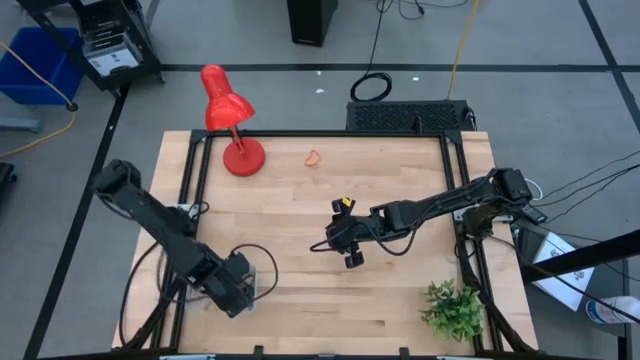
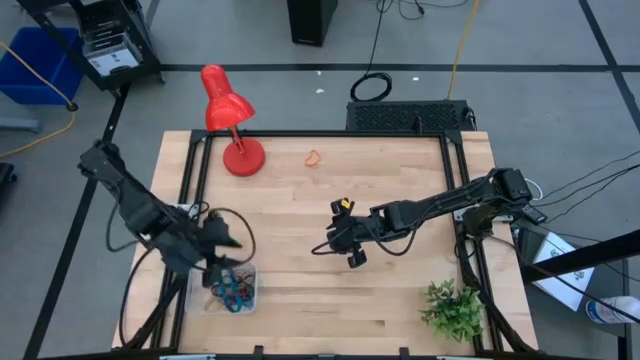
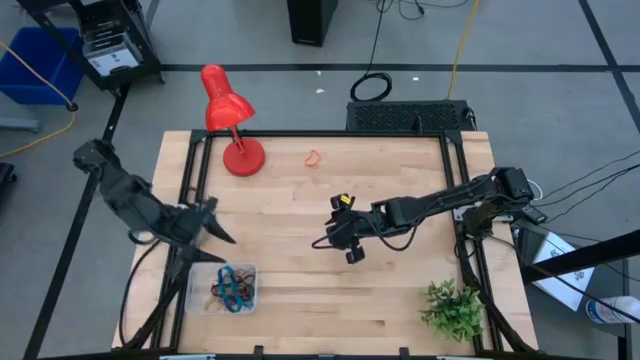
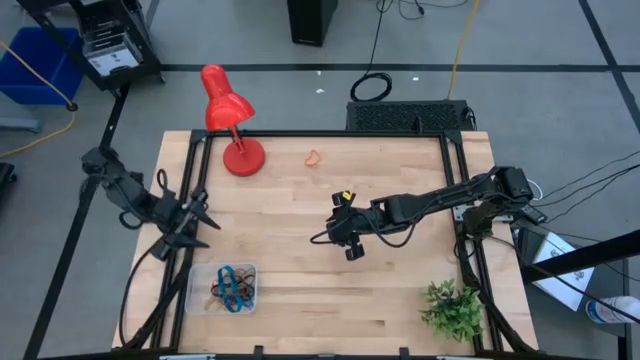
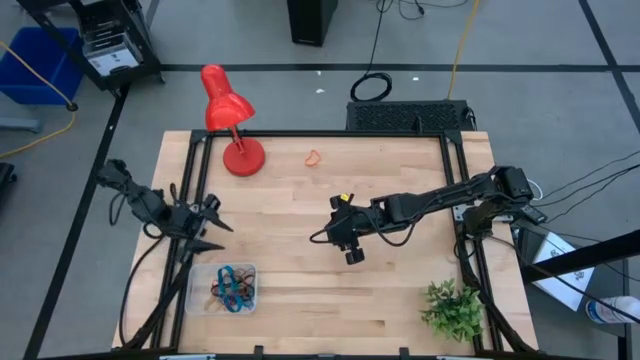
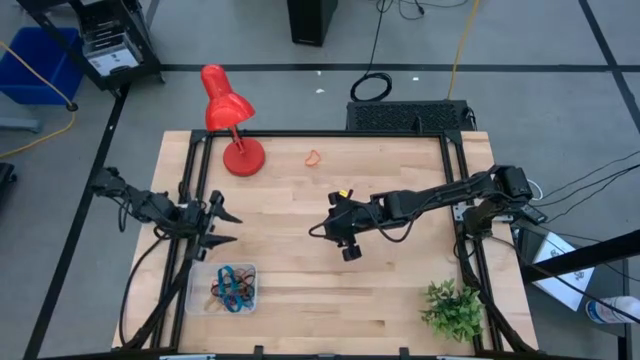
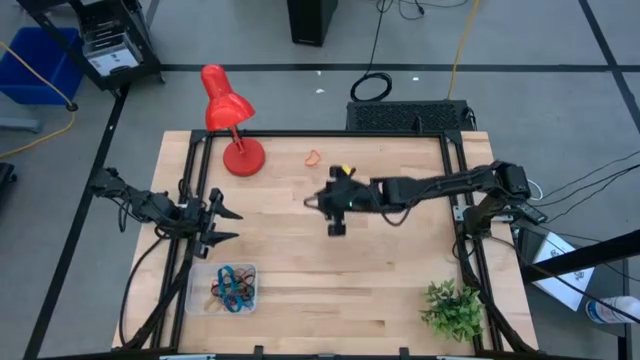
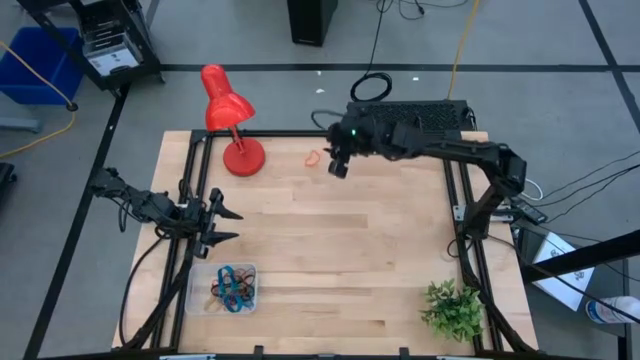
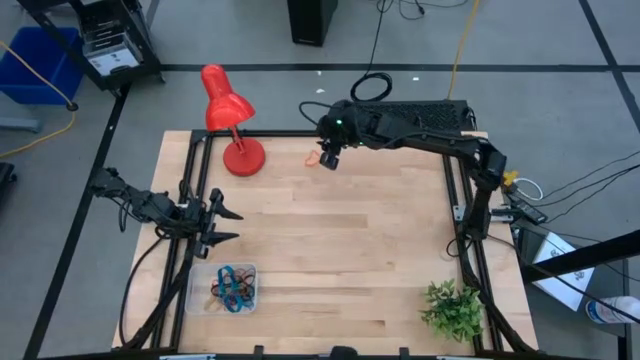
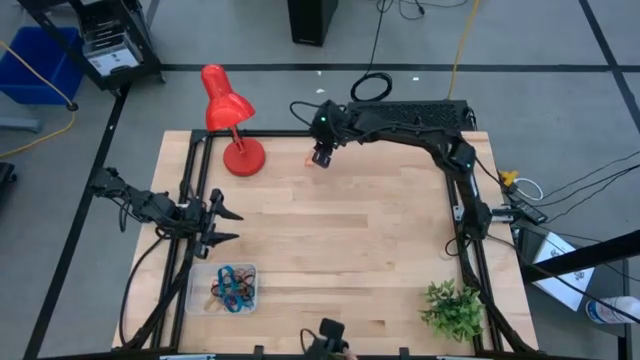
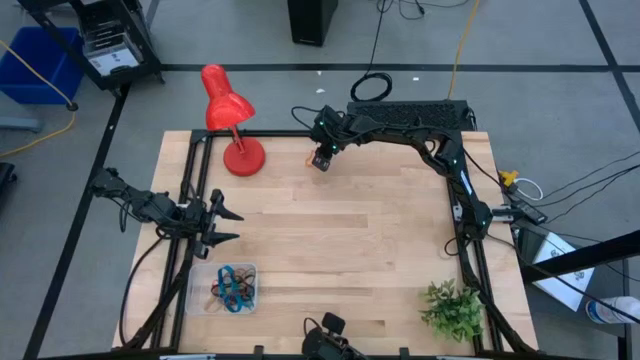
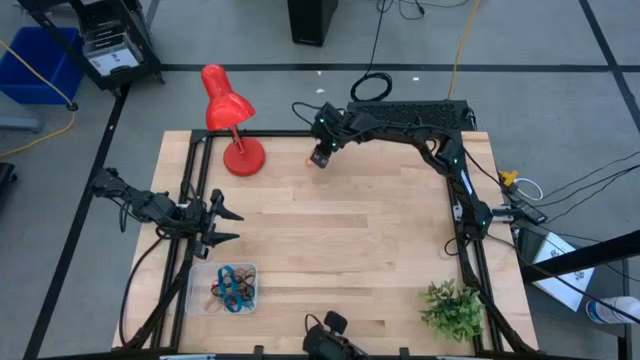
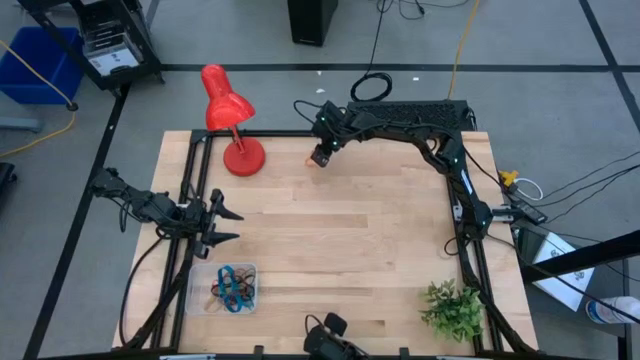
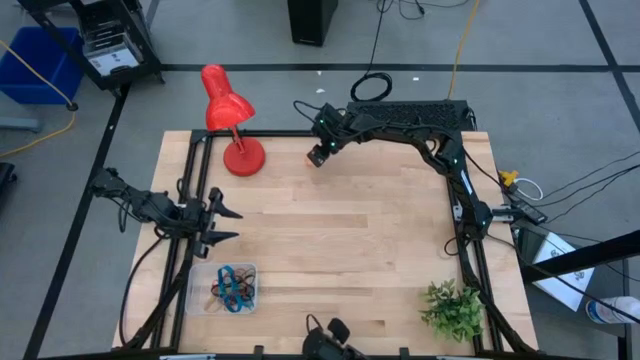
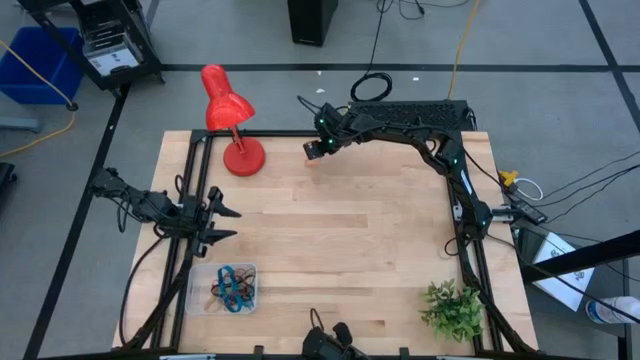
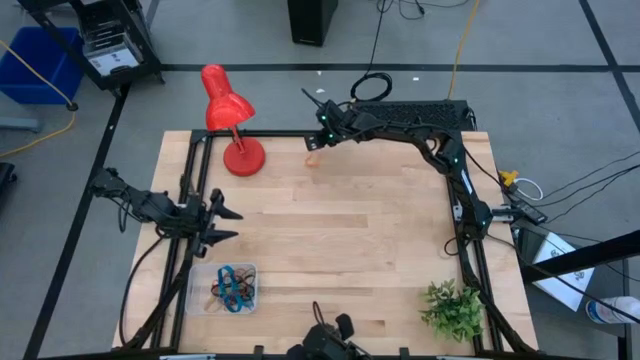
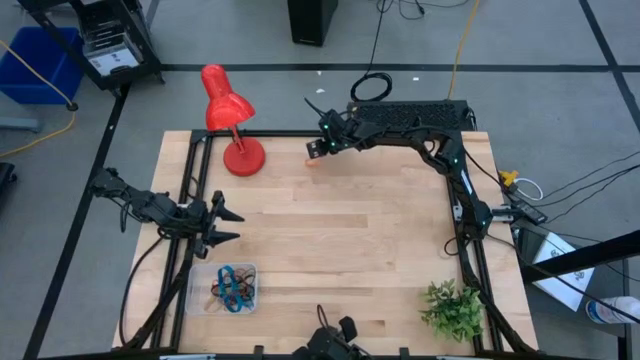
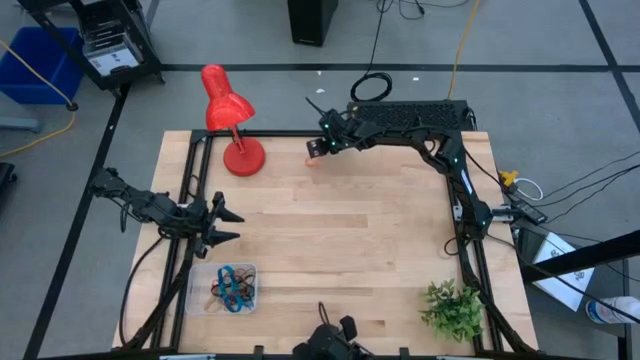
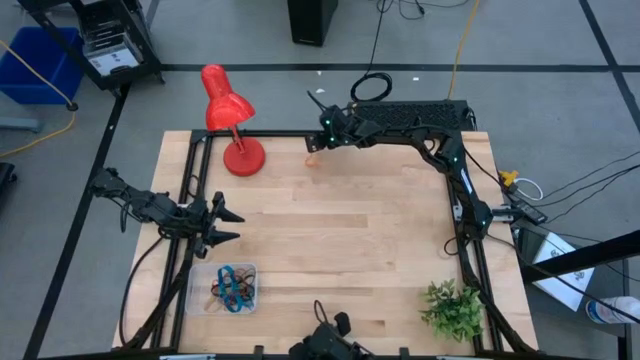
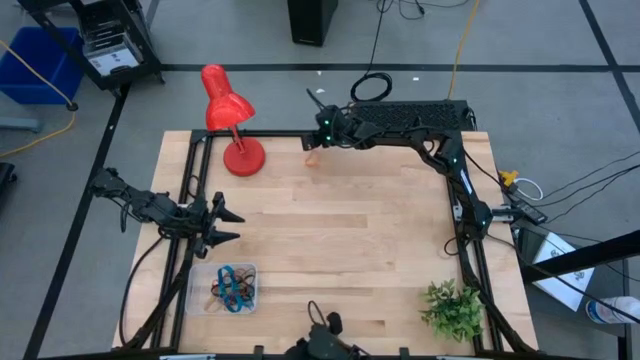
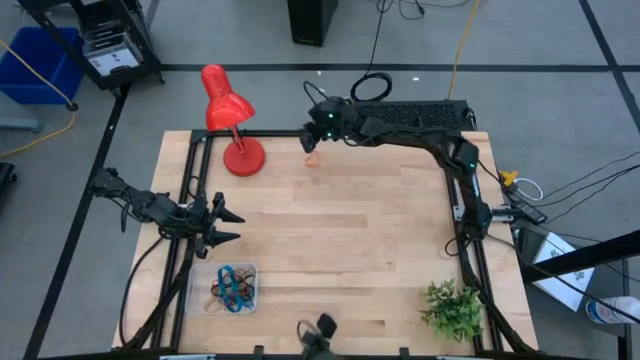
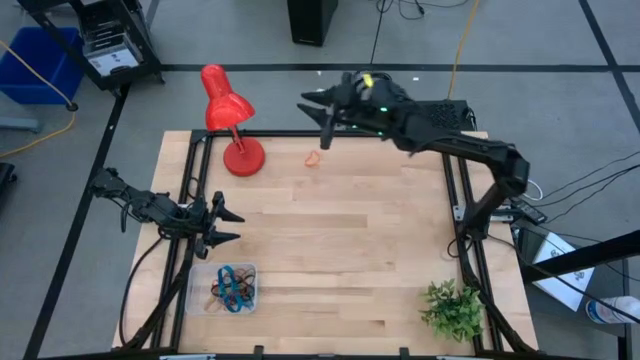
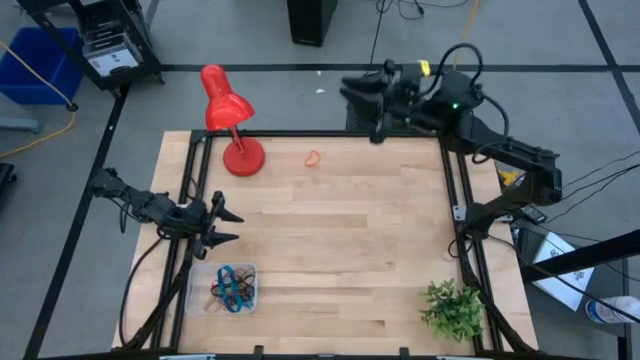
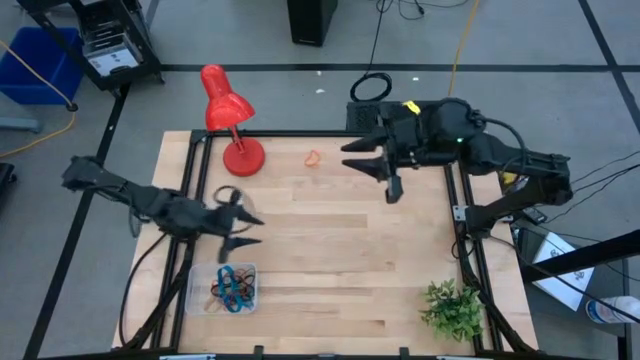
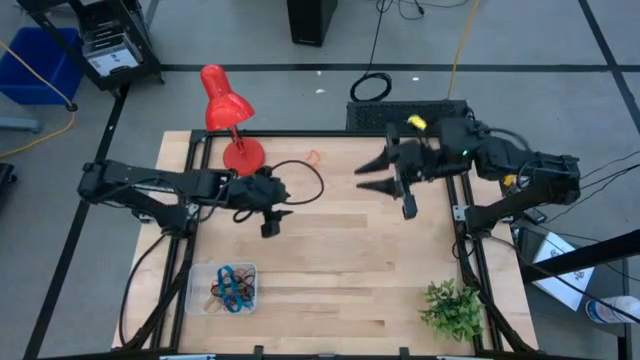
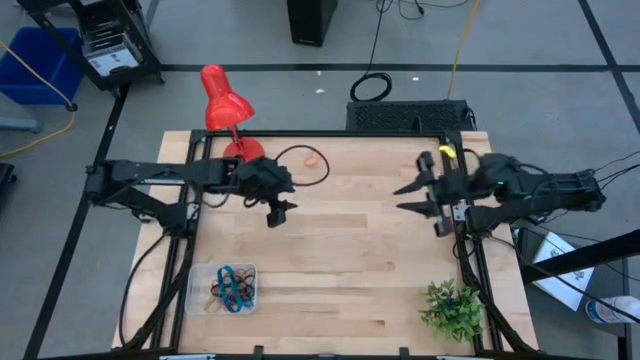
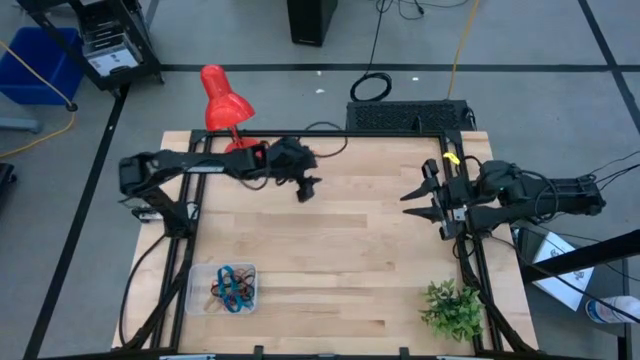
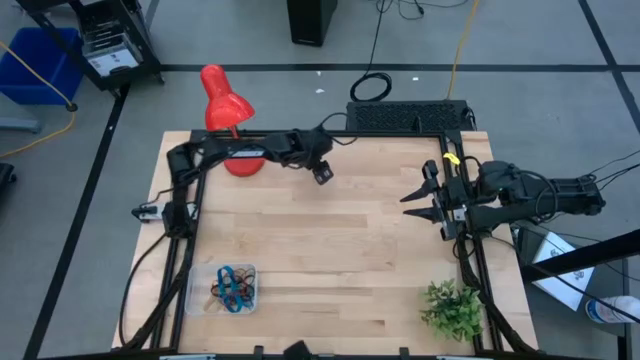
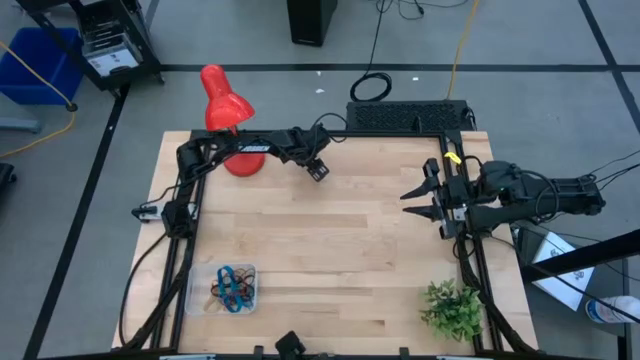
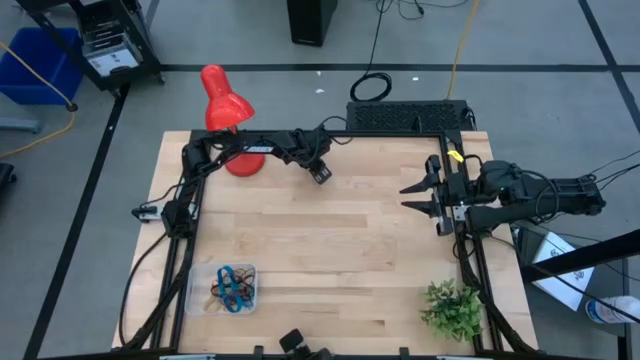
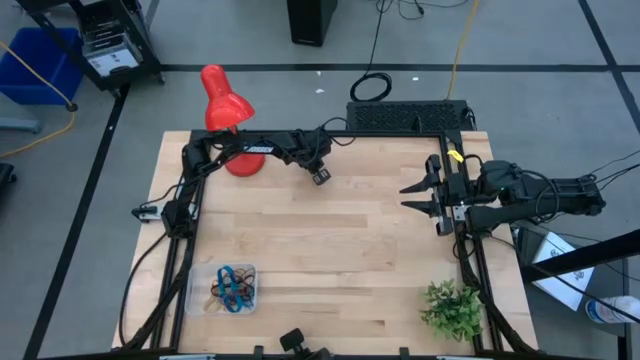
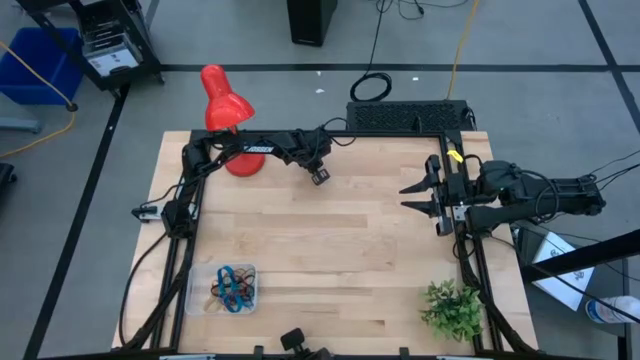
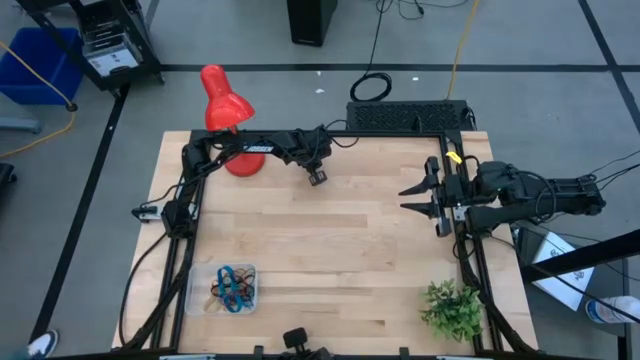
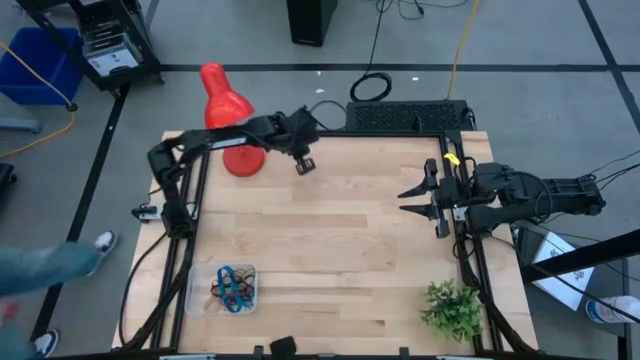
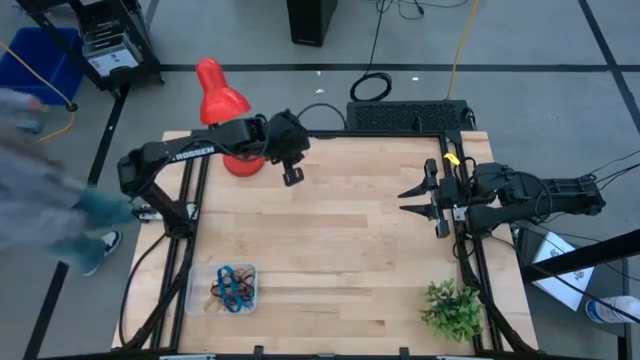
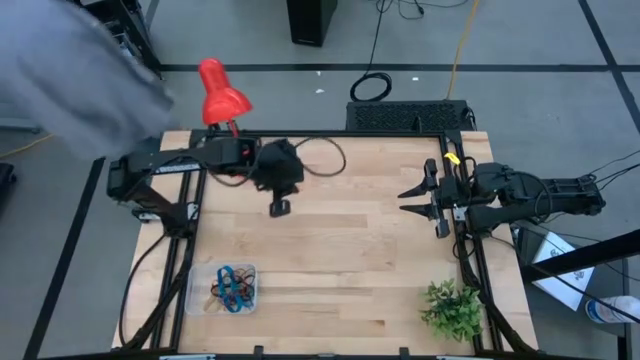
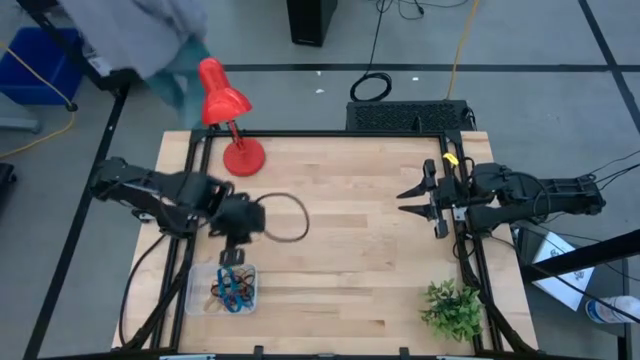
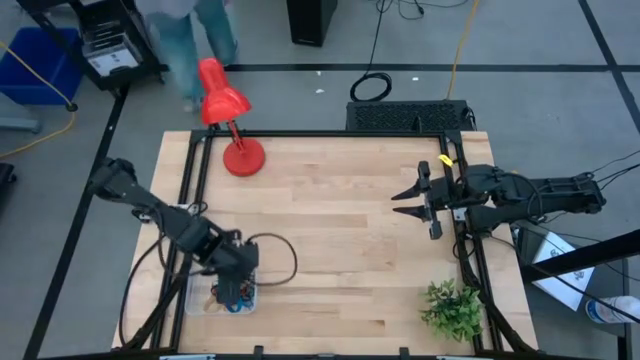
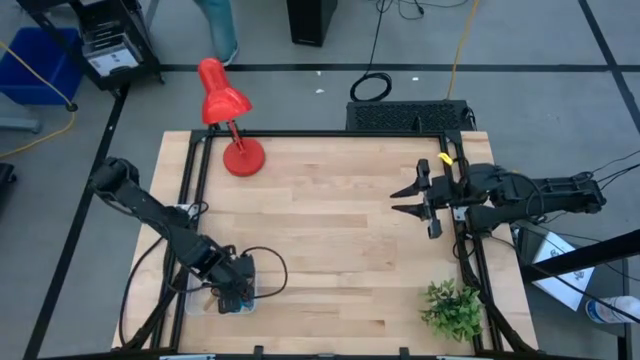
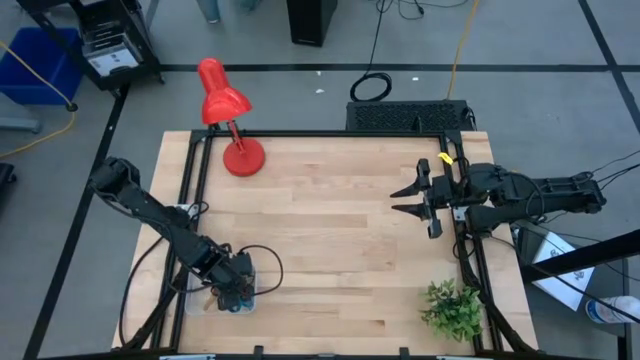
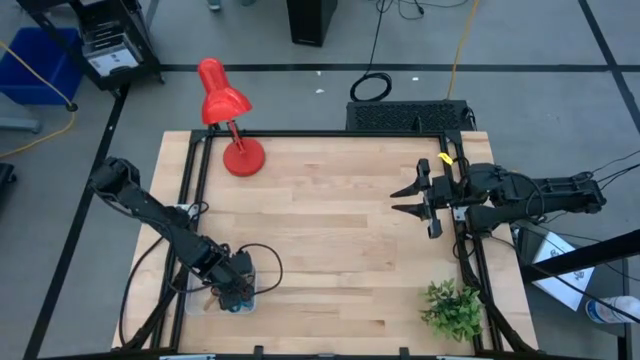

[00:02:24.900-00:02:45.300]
Task: Pick and place rubber bands into bin
Put the orange rubber band into the transparent bin
